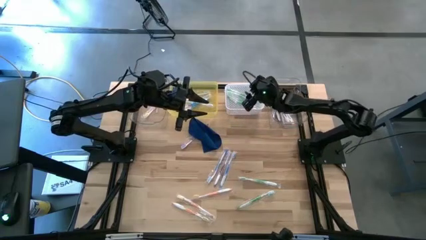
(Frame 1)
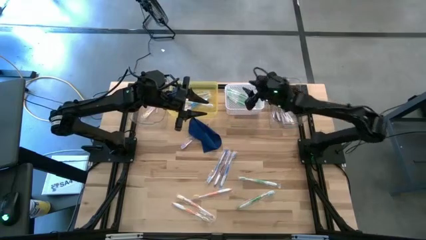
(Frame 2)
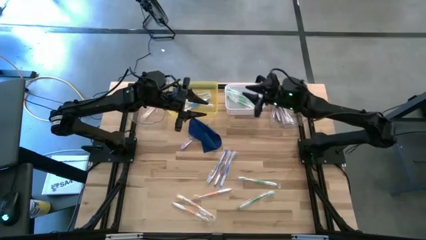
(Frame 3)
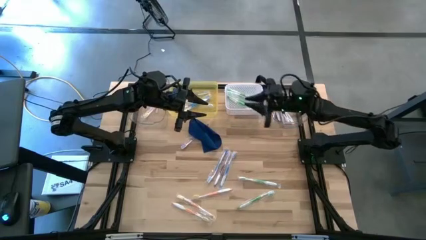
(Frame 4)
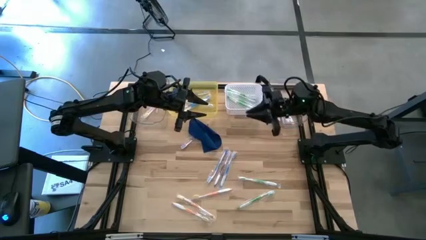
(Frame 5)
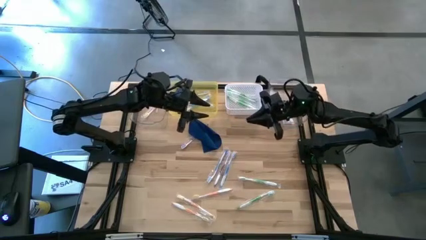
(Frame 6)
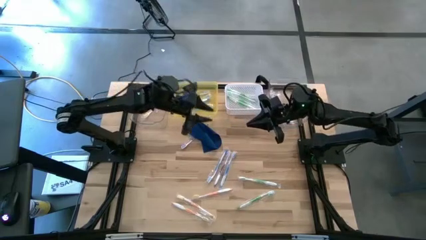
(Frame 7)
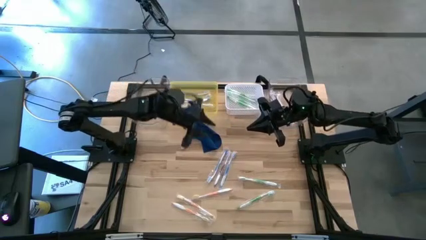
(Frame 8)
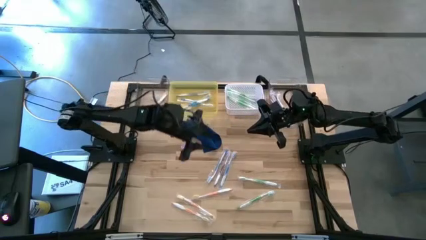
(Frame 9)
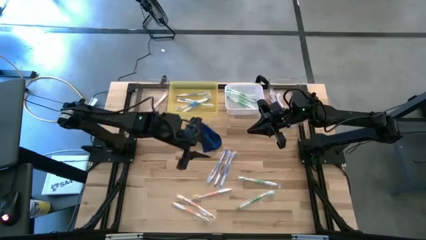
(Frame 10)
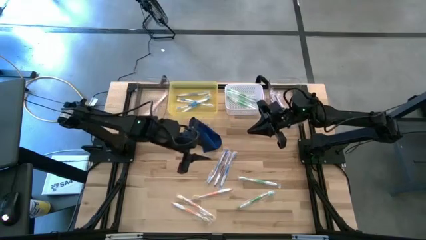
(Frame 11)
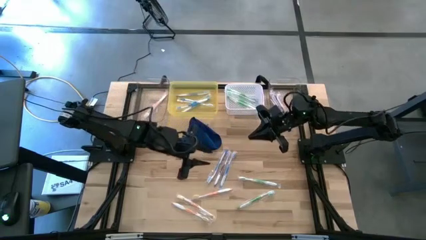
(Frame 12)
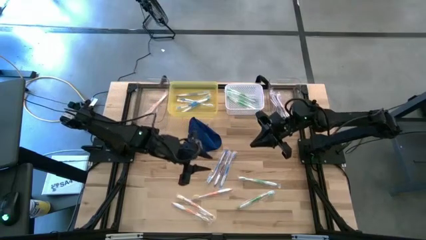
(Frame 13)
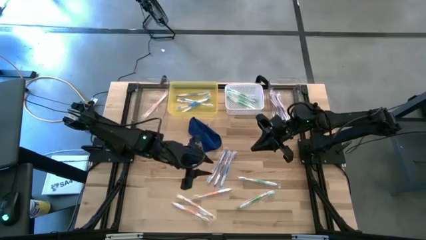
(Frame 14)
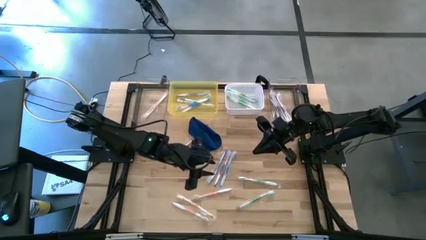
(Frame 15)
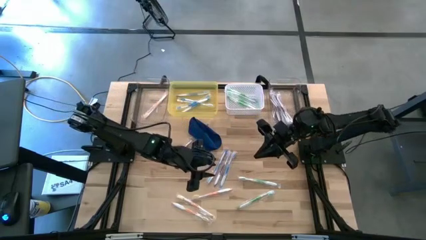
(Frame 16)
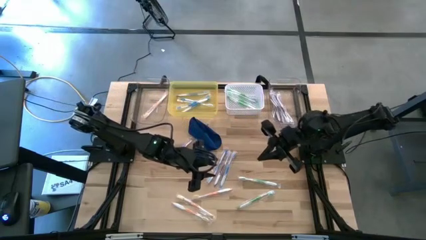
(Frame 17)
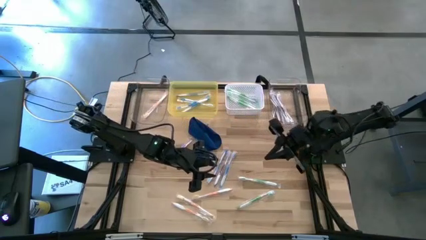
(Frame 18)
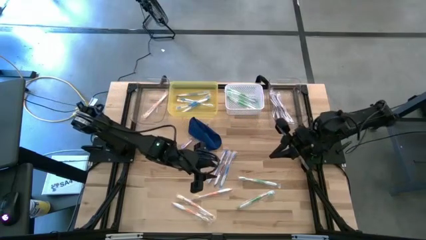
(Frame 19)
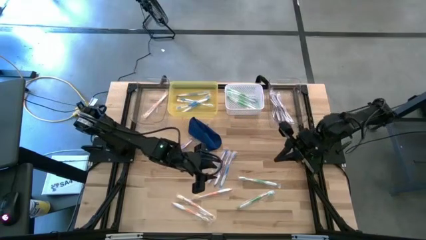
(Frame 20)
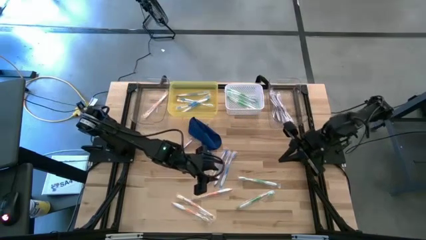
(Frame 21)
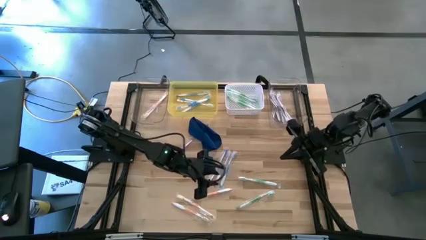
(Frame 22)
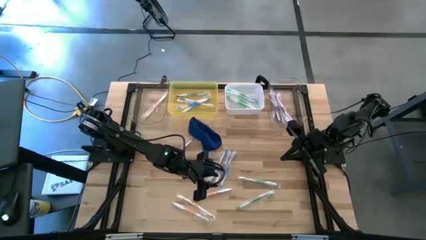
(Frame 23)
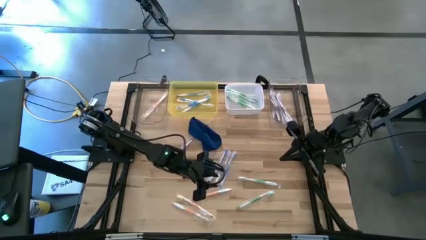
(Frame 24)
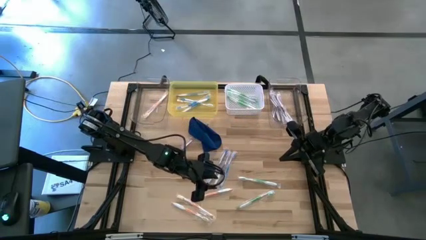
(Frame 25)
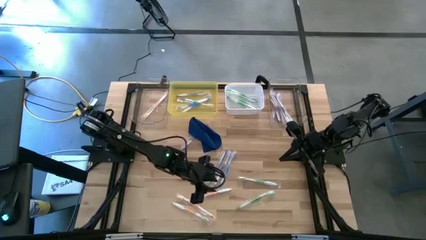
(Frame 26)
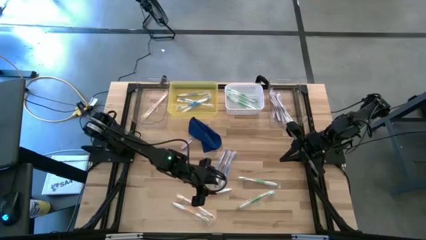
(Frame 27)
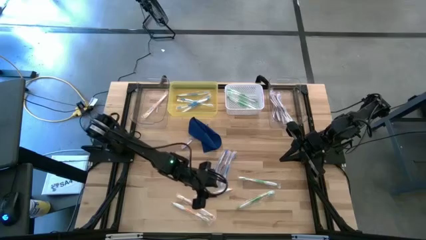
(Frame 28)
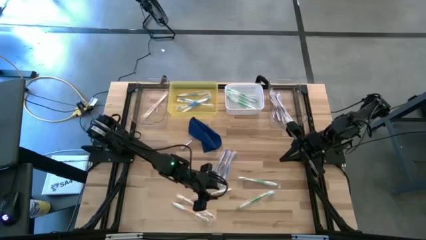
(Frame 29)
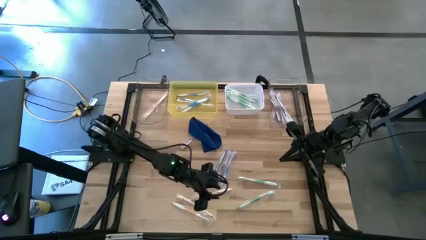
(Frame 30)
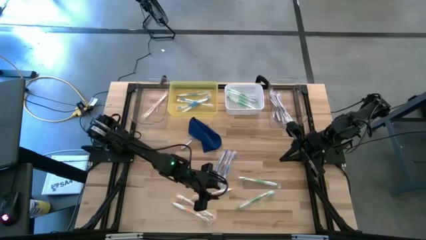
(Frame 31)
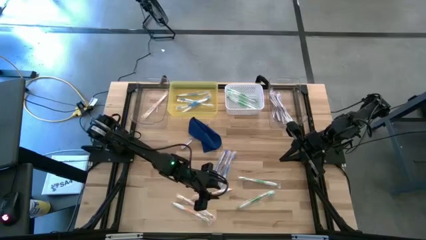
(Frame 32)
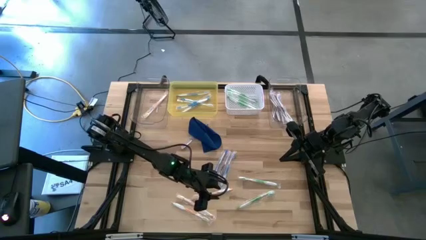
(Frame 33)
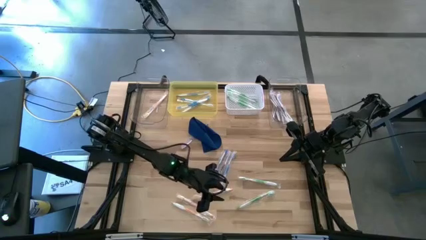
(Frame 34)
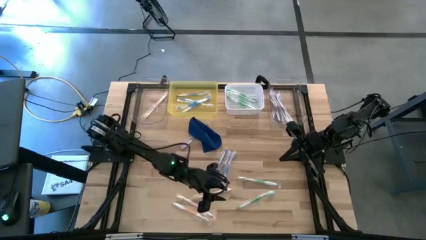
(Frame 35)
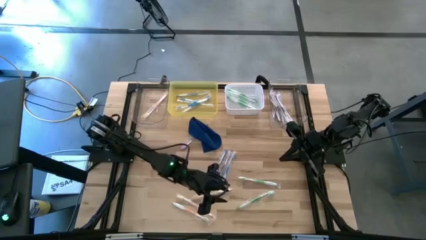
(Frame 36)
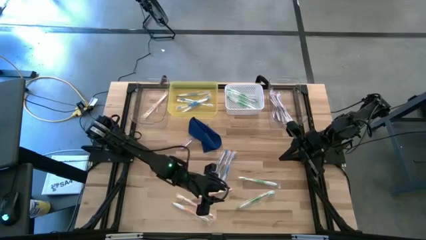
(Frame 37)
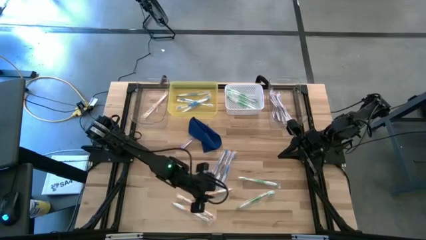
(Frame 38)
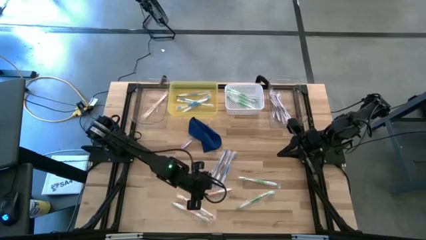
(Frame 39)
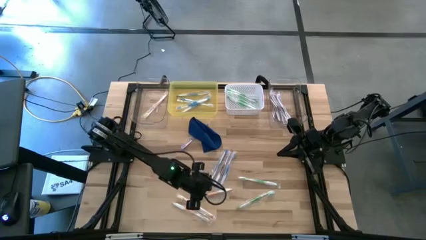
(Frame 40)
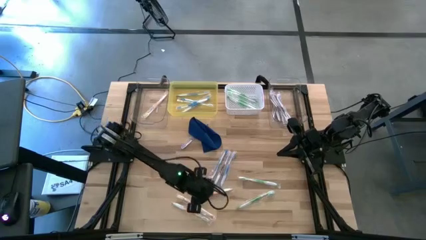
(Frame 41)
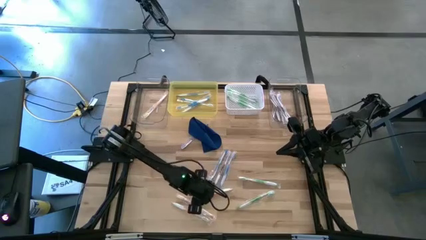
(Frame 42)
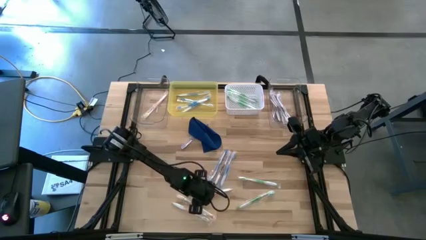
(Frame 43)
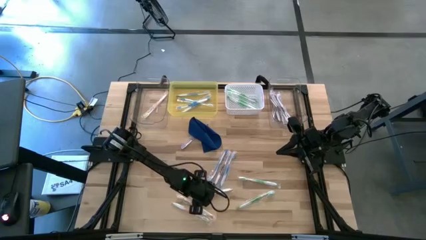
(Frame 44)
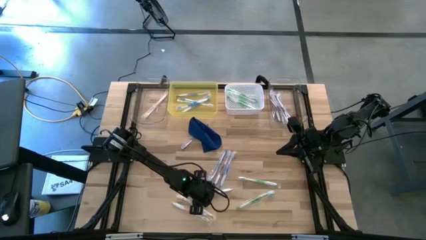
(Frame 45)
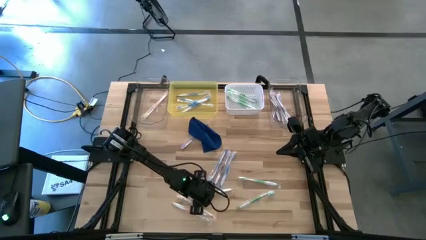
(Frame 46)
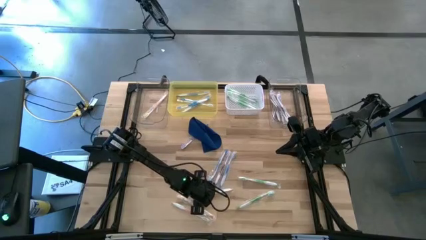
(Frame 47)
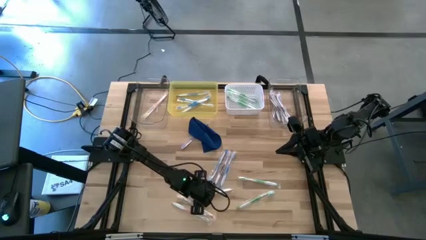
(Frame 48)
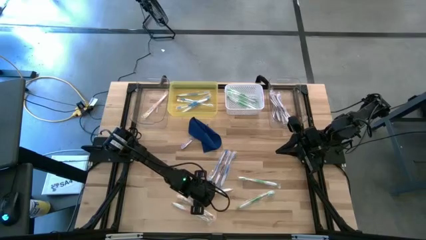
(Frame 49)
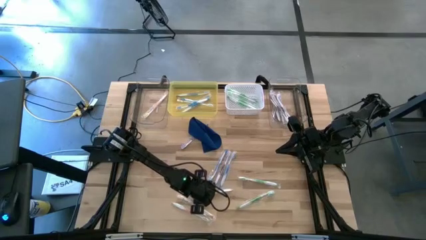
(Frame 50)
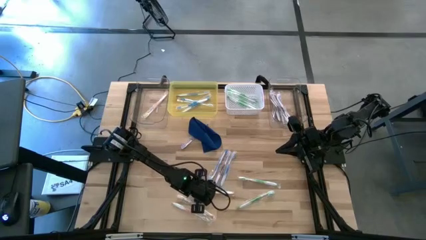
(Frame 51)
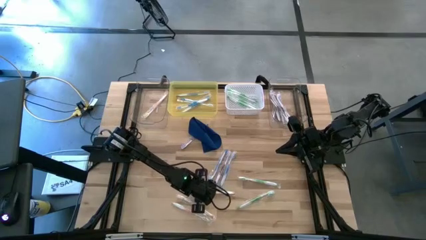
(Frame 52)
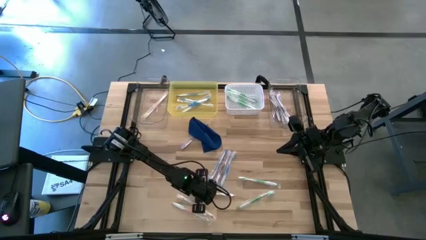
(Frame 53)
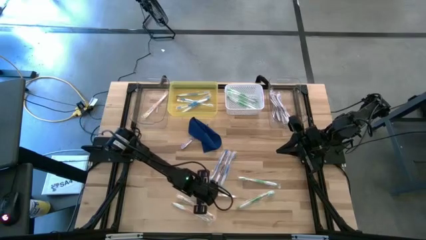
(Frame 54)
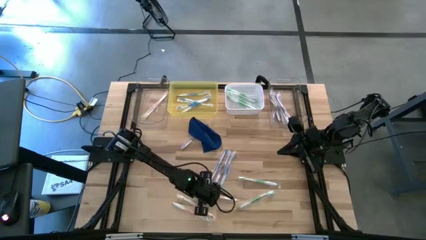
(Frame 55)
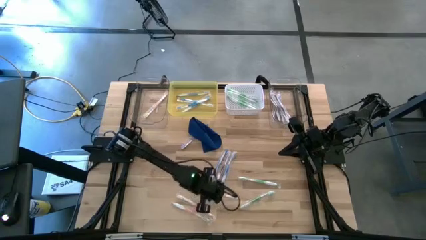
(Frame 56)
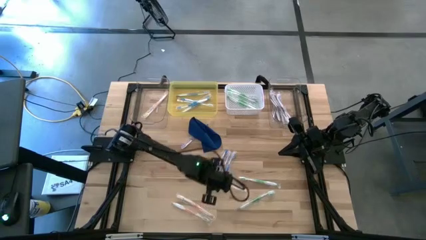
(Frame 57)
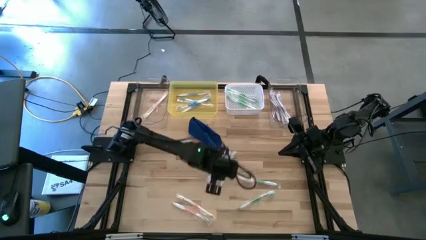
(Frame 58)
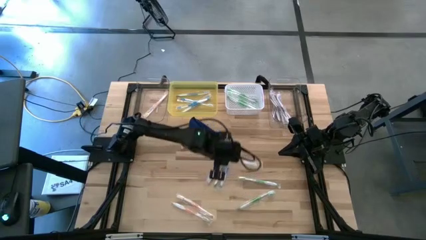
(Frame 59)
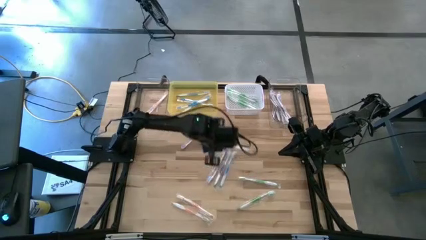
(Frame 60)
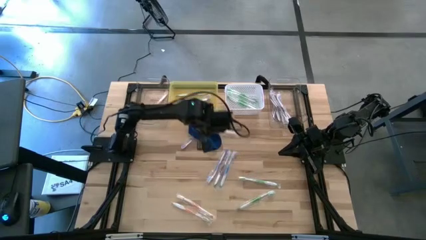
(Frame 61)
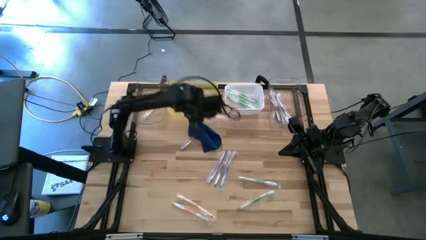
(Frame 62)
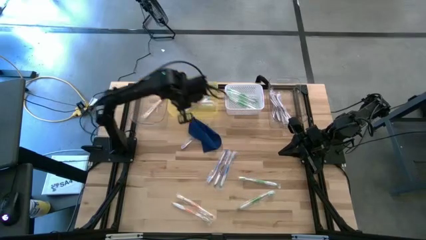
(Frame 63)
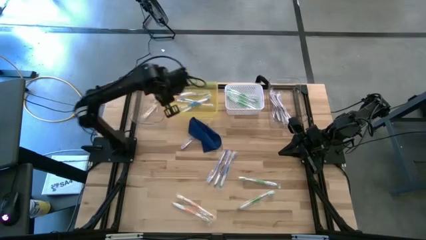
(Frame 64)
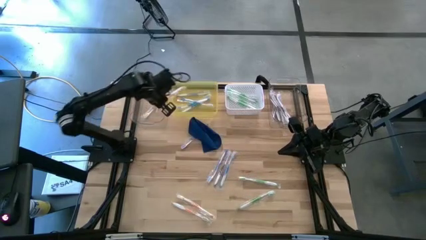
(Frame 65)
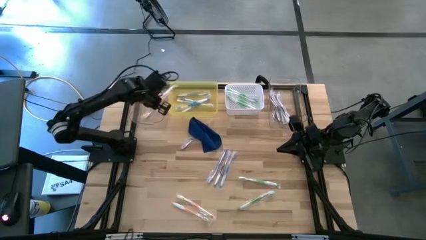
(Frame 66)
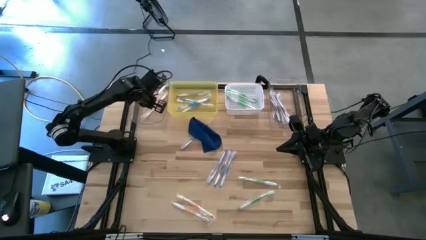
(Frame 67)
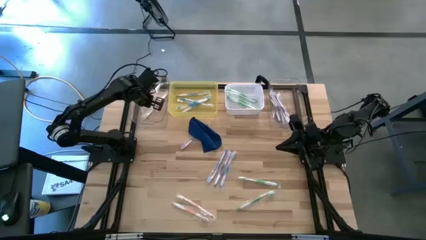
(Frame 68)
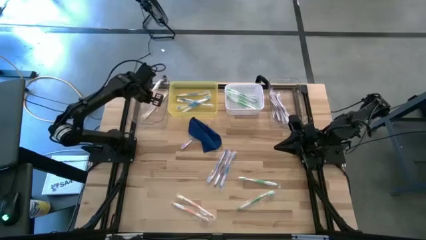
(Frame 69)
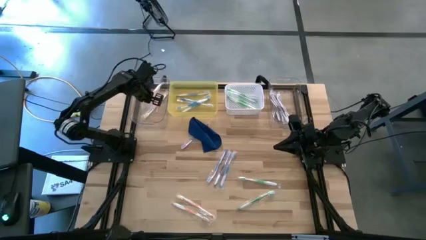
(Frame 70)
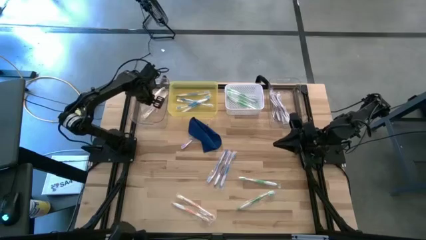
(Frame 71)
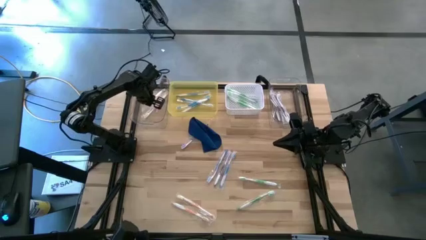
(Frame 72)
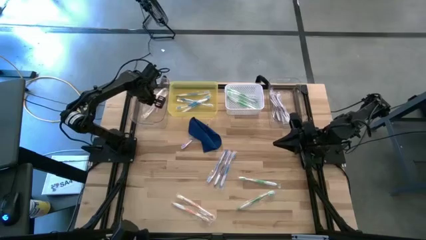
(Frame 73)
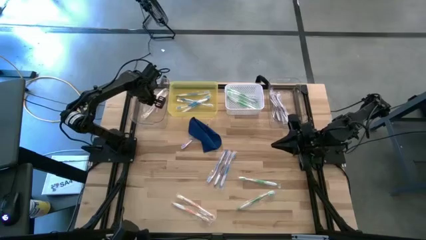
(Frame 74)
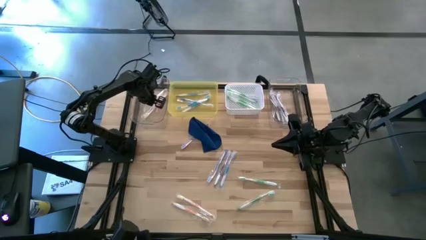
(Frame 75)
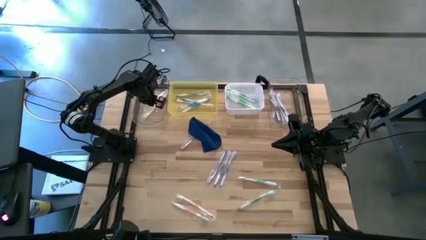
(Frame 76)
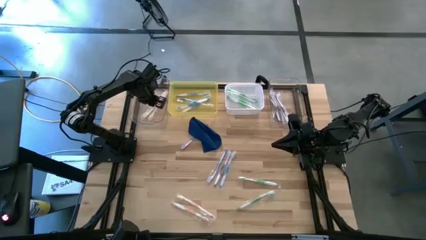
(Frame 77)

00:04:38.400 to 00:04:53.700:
Task: Pick & Place Toothbrushes
Put the orange toothbrush into the left transparent bin
